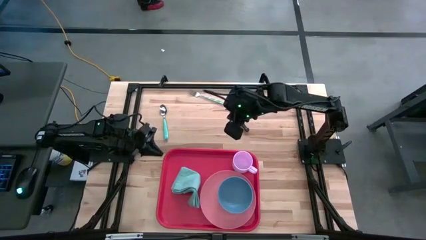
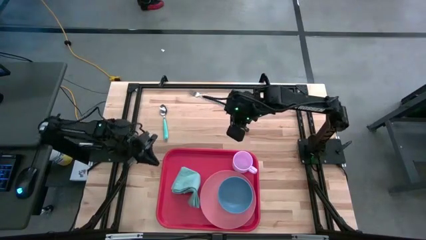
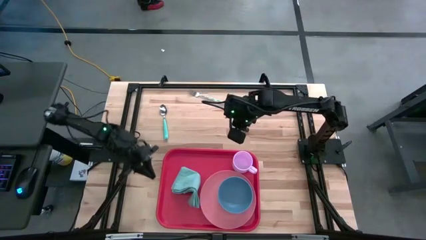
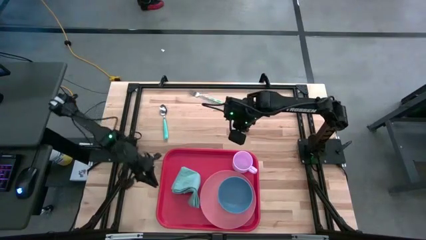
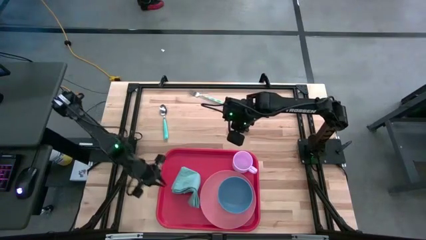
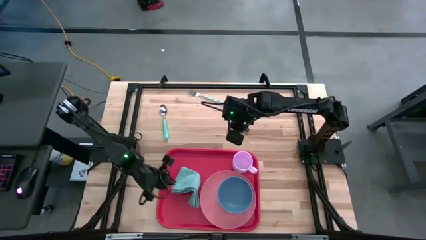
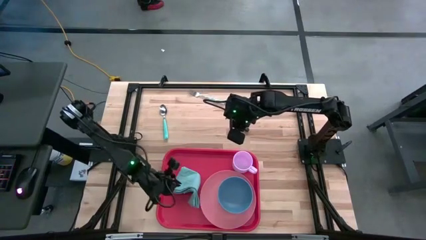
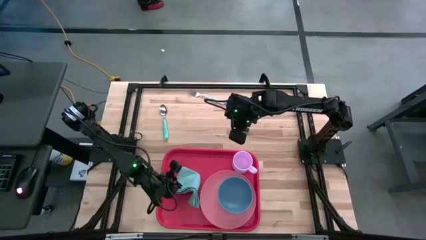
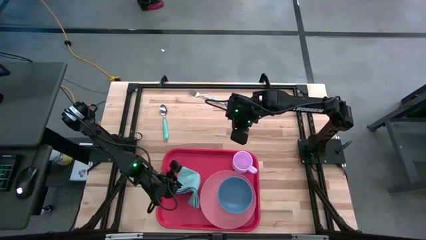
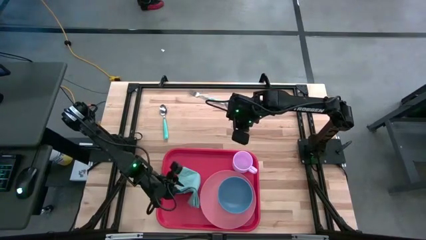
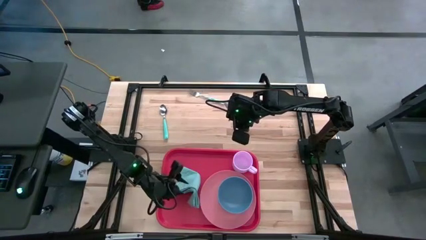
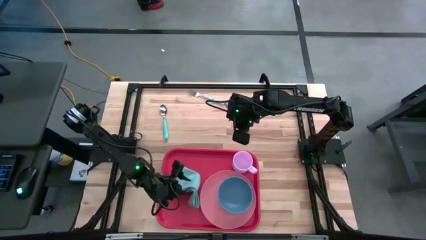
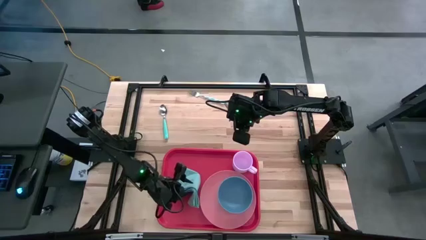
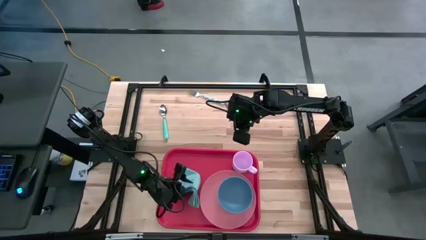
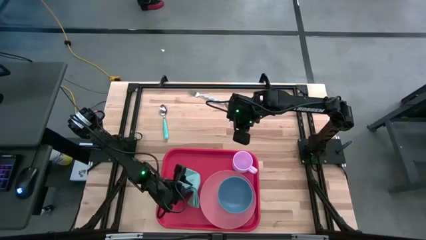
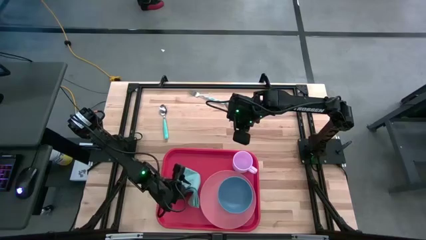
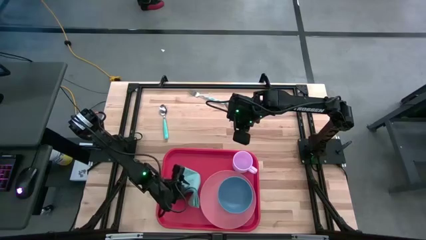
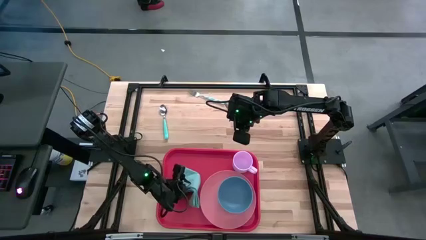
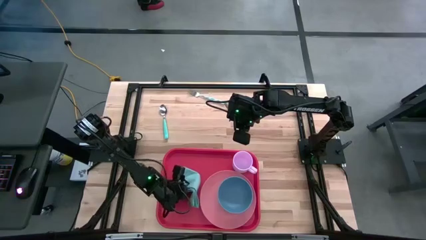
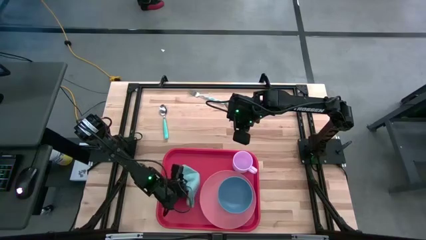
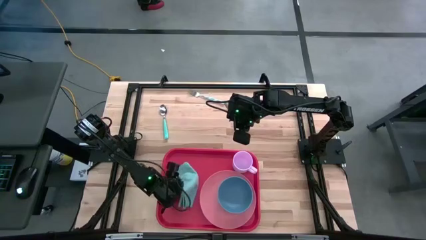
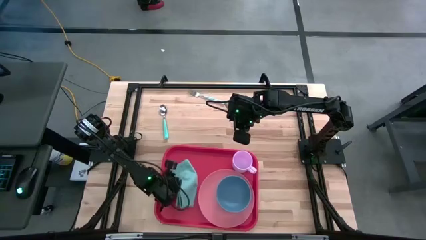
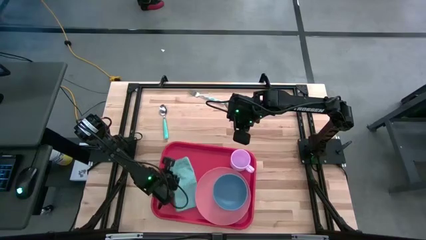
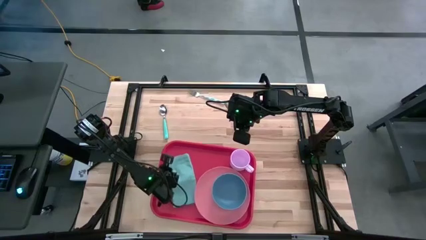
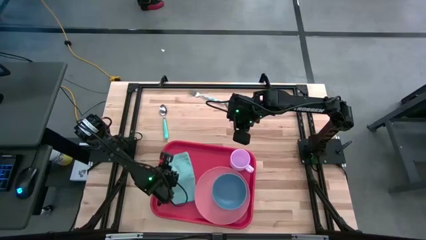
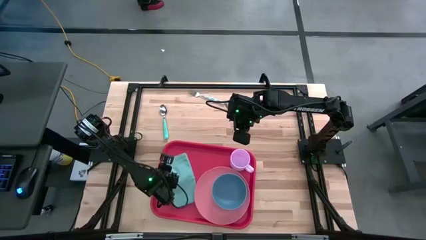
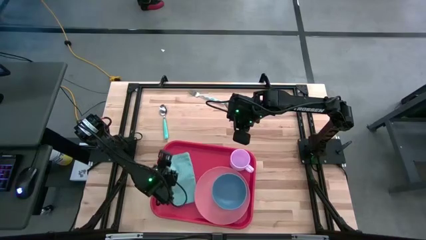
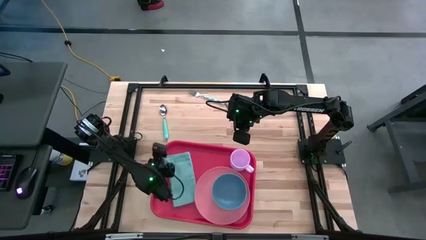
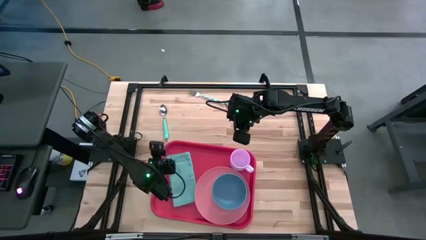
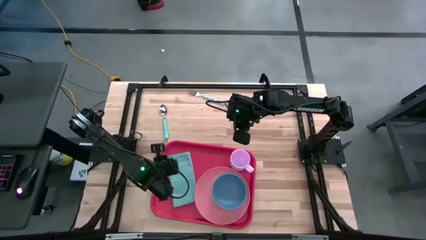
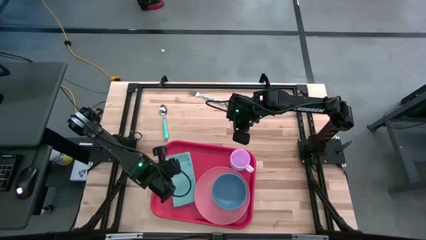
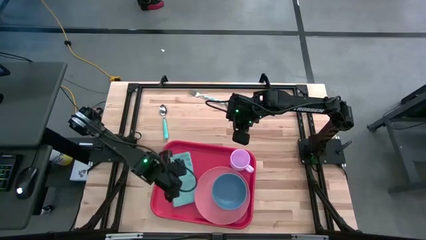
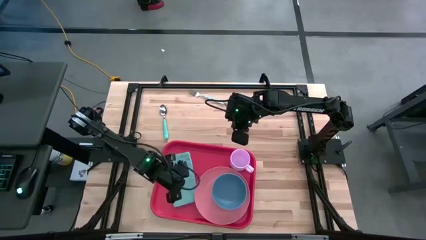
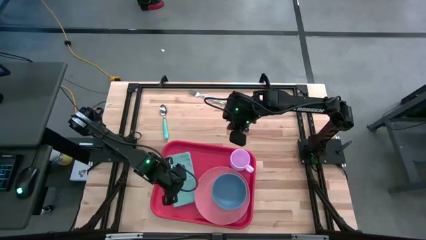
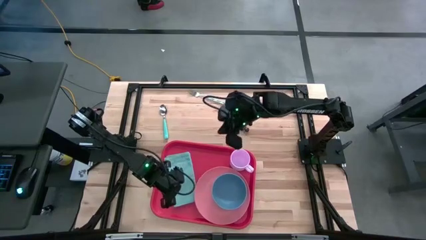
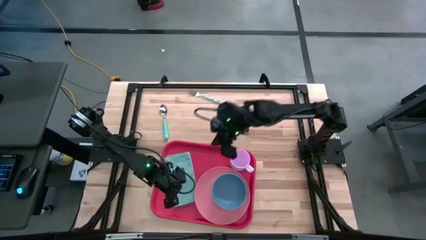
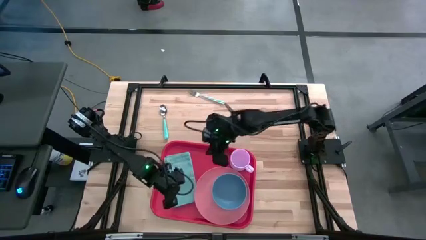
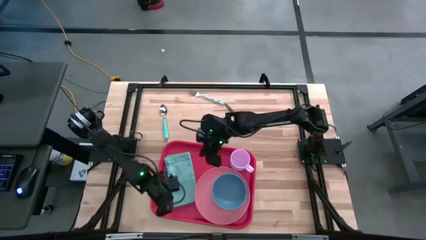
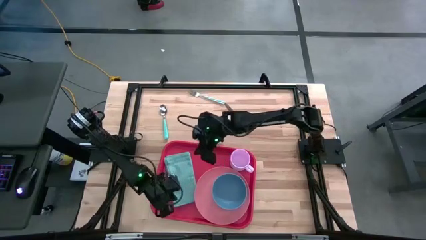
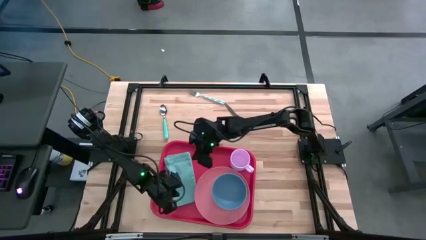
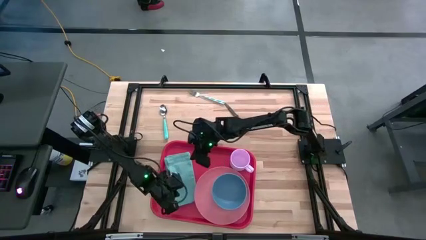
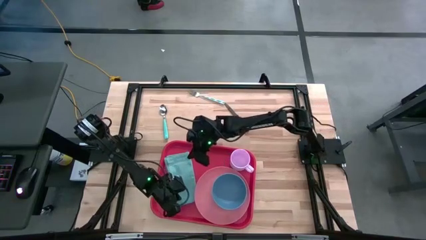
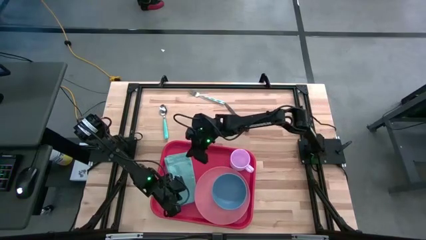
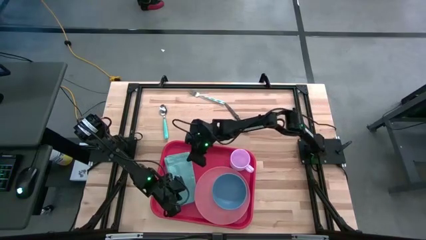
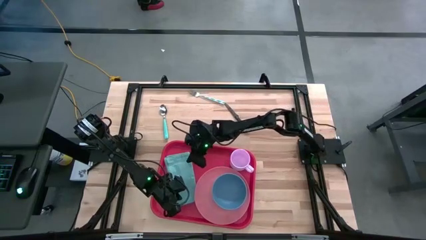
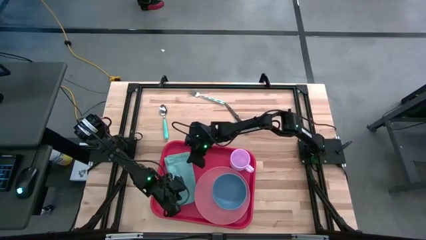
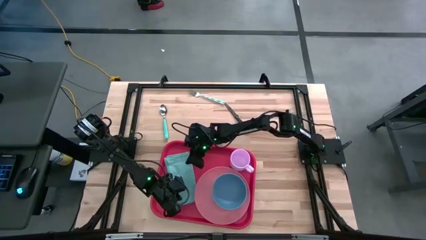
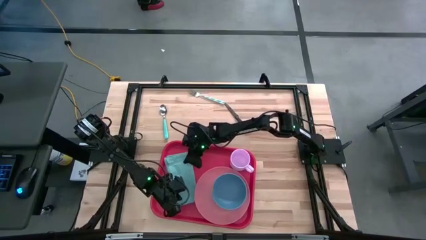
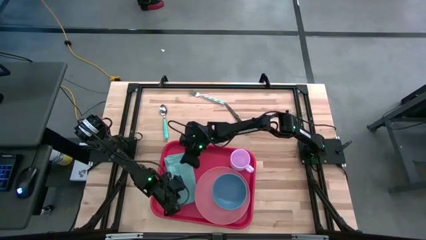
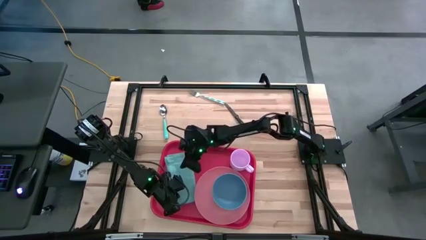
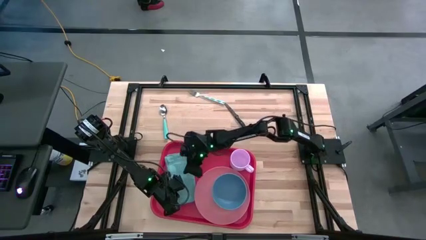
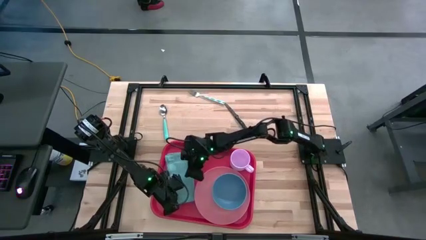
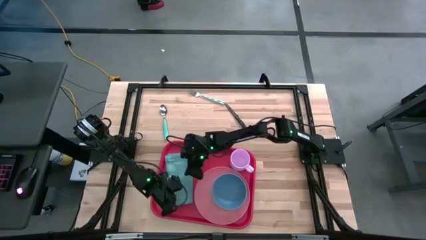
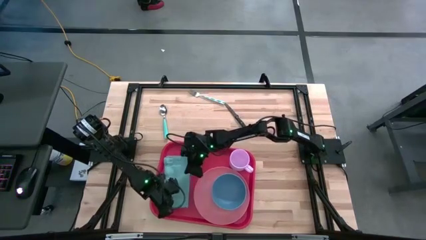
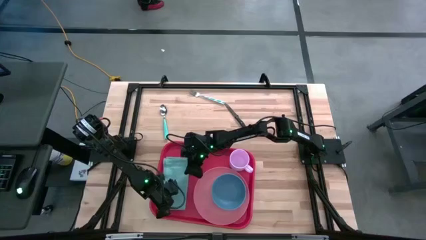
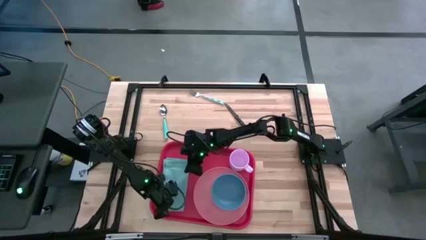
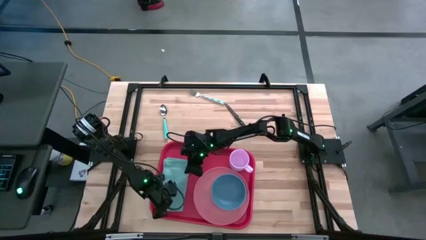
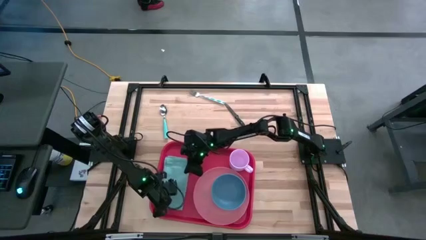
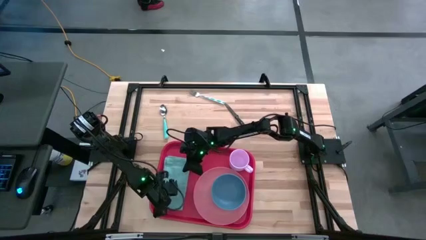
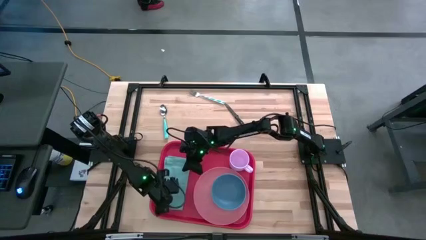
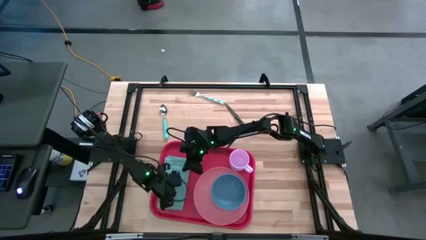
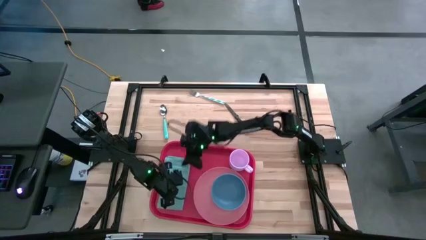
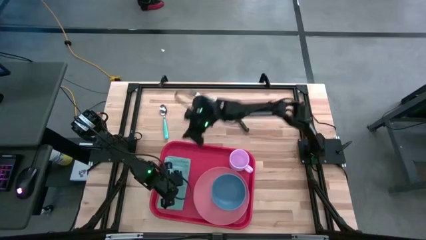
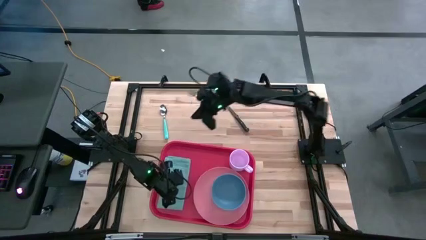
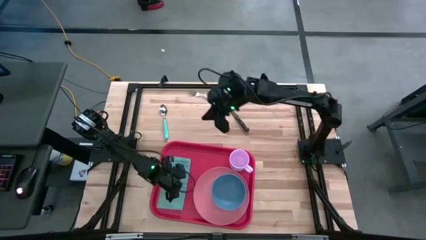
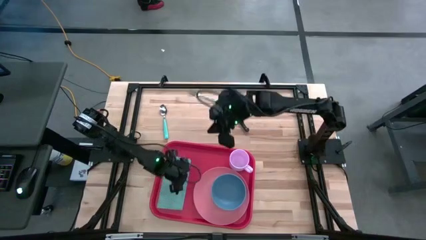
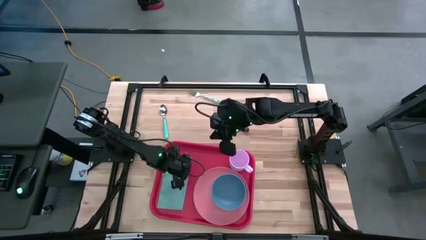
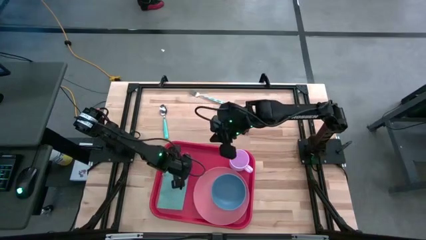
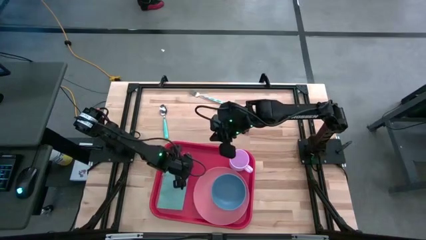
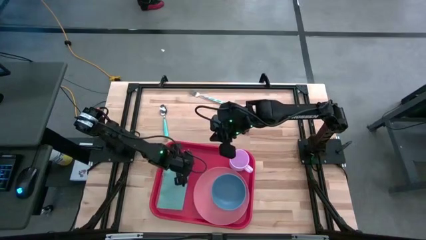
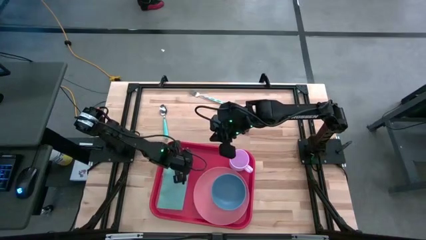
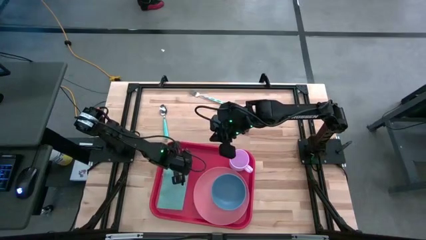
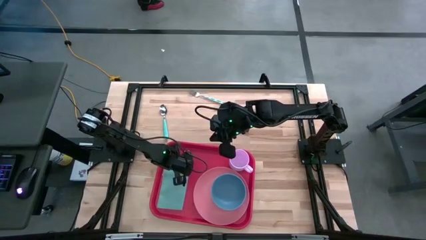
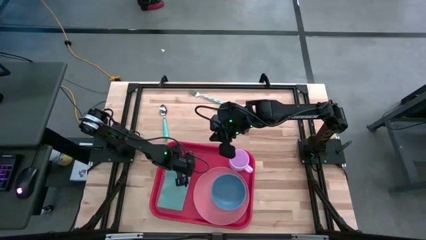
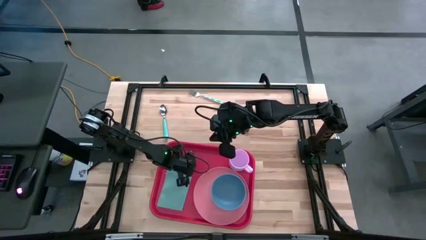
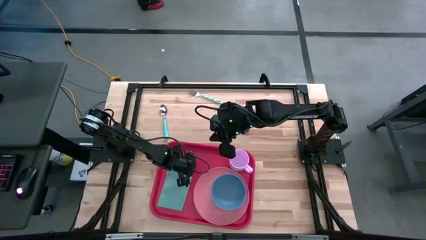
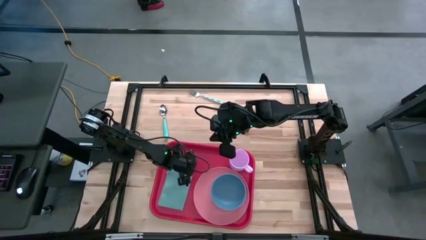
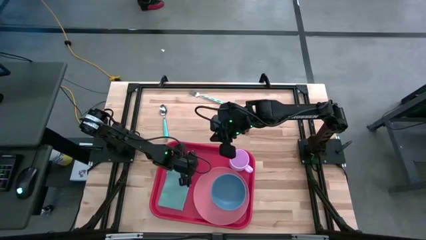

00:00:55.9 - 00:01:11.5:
Task: Set up tray
Put the blue table napkin on the red serving tray to the left of the pink plate
